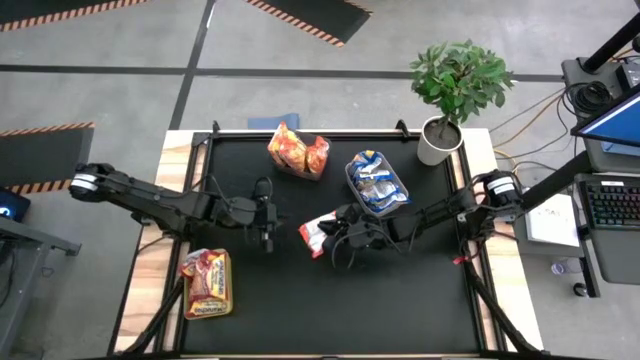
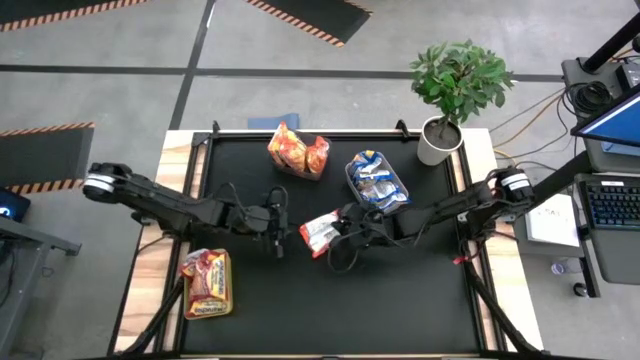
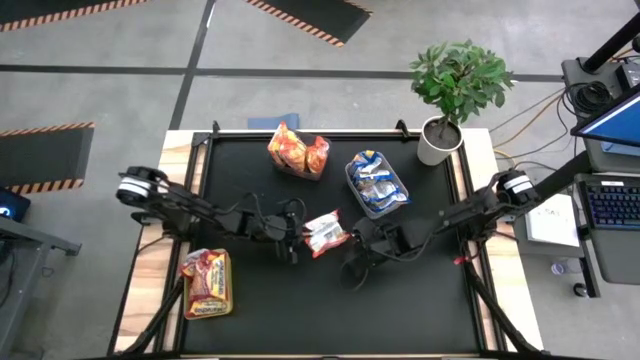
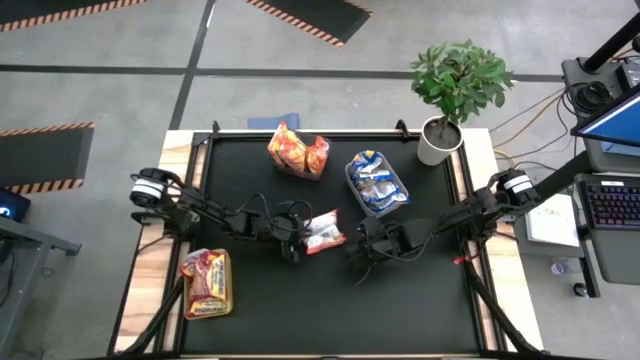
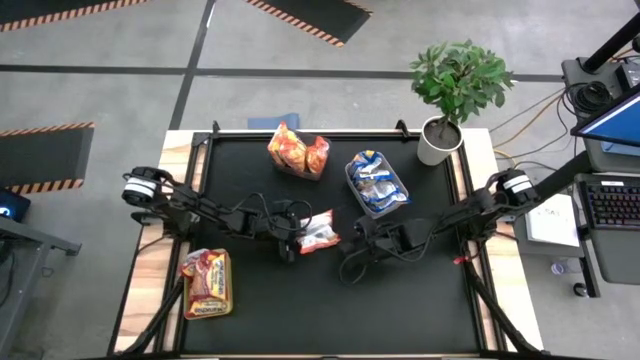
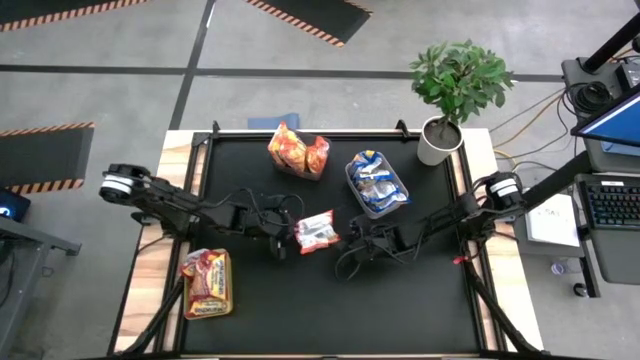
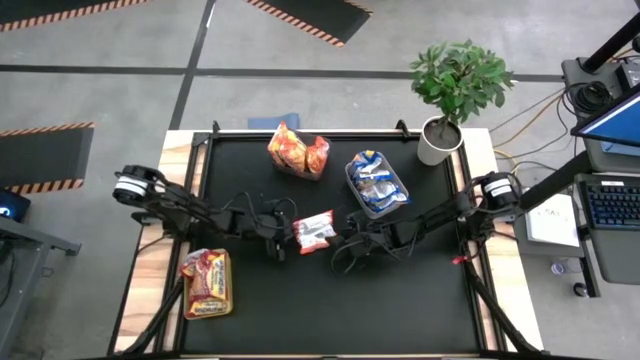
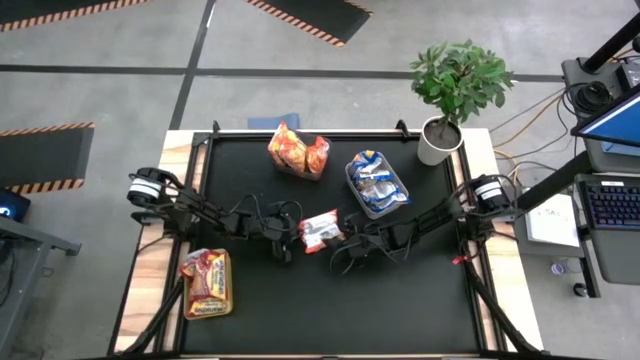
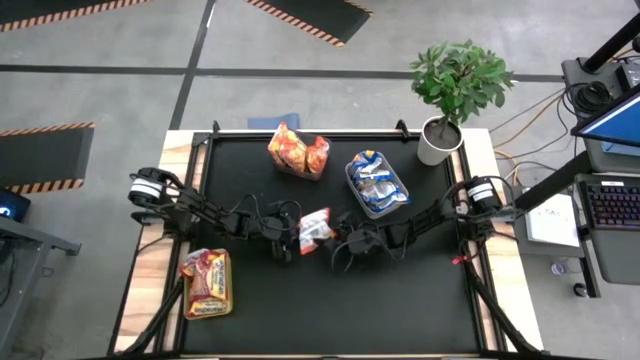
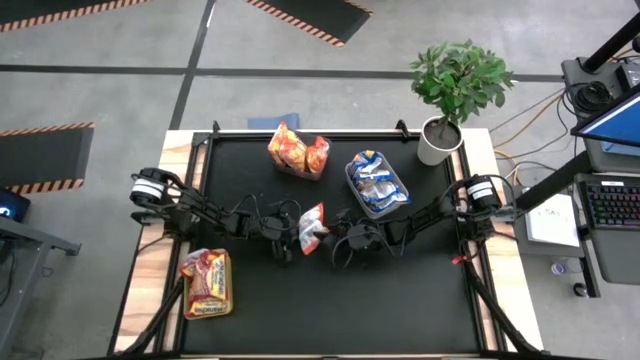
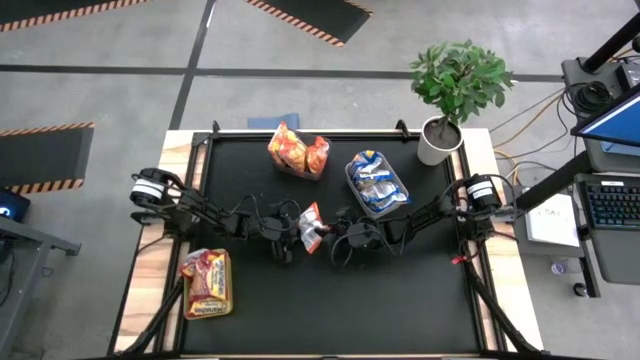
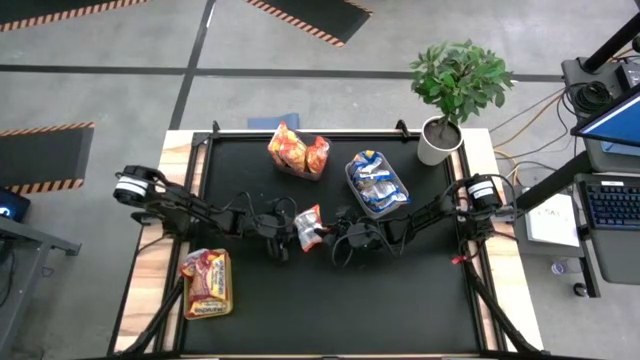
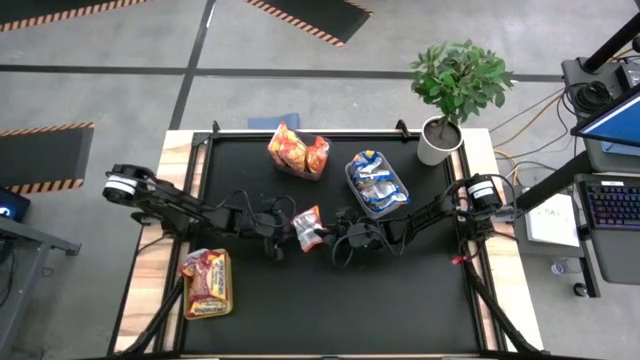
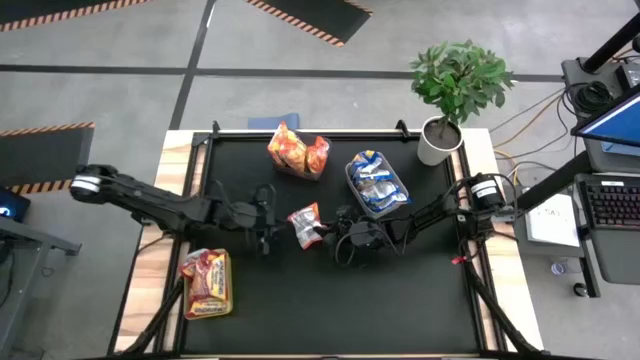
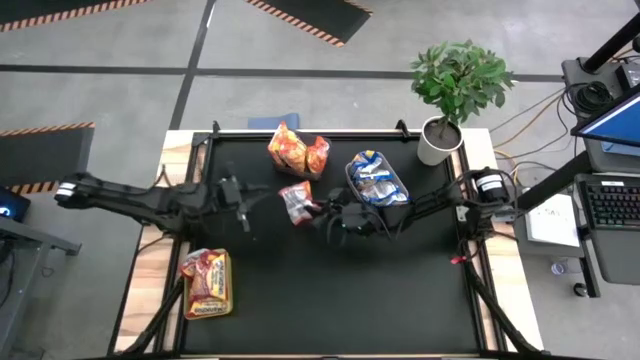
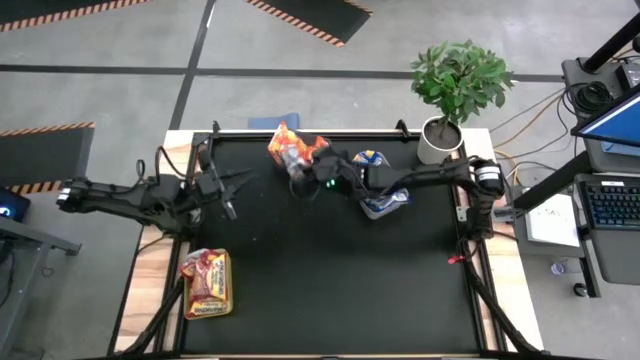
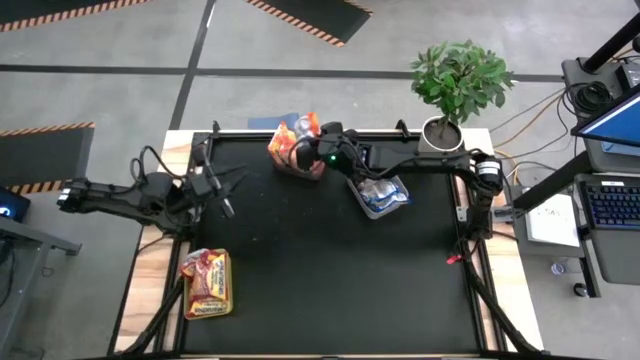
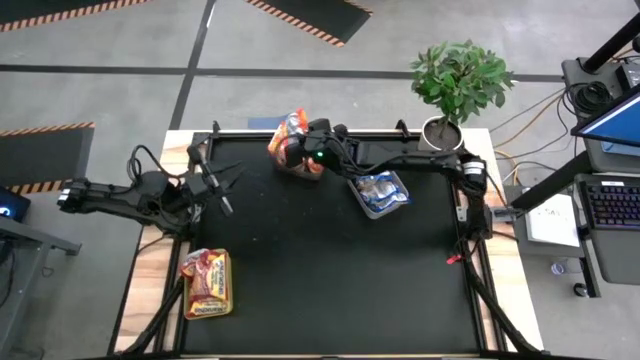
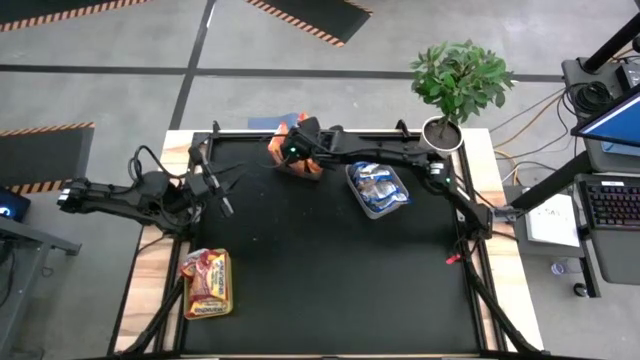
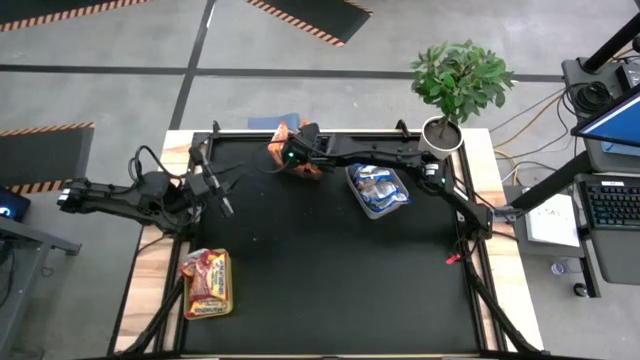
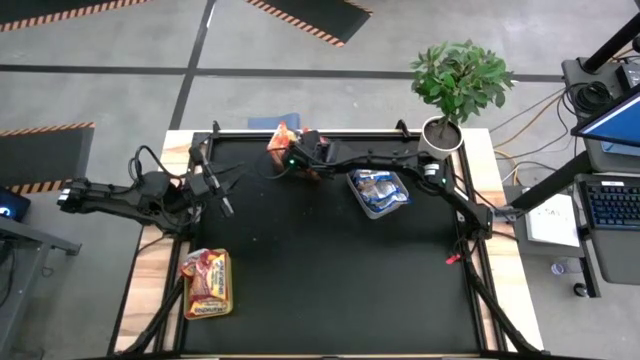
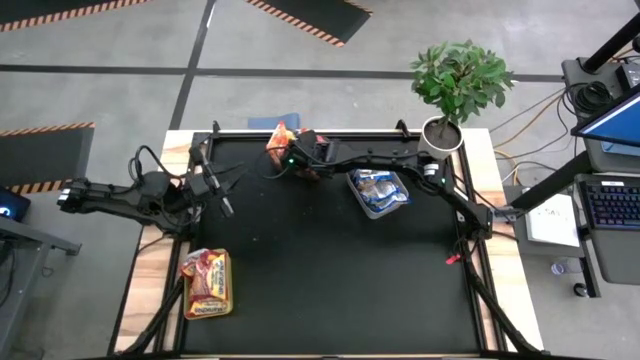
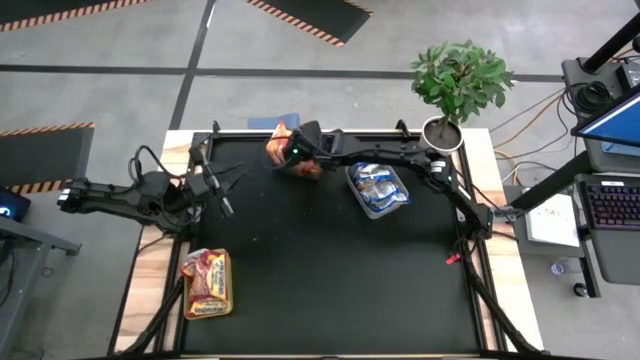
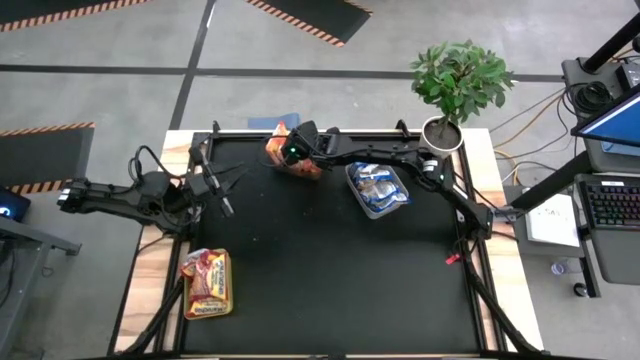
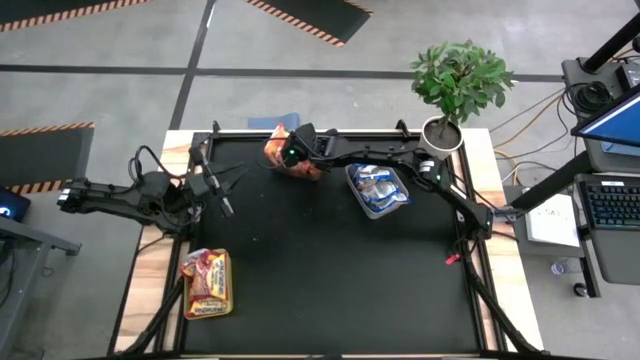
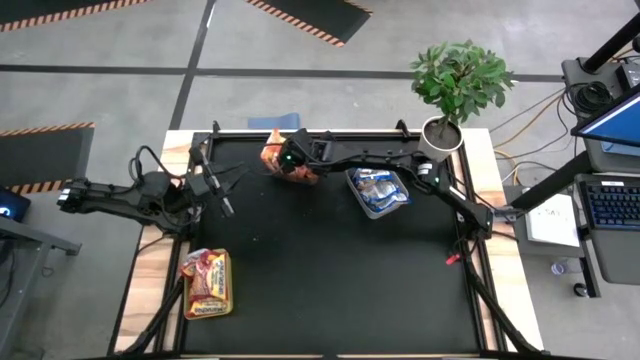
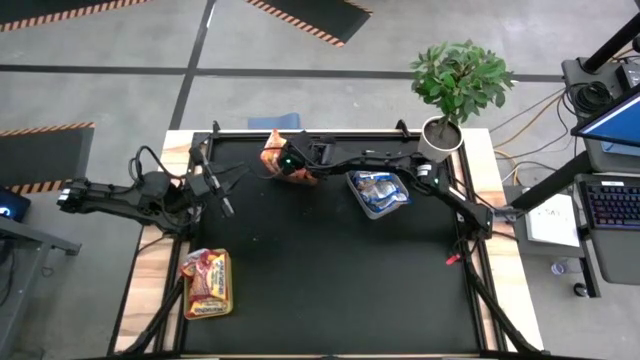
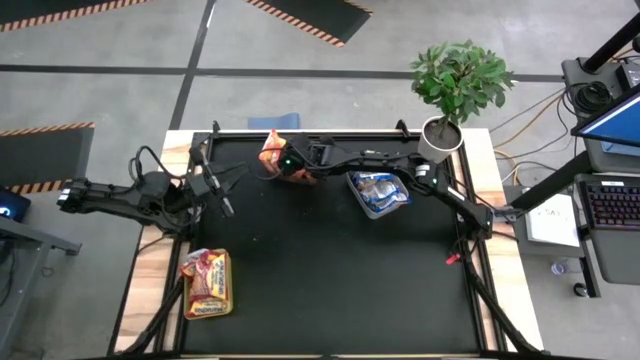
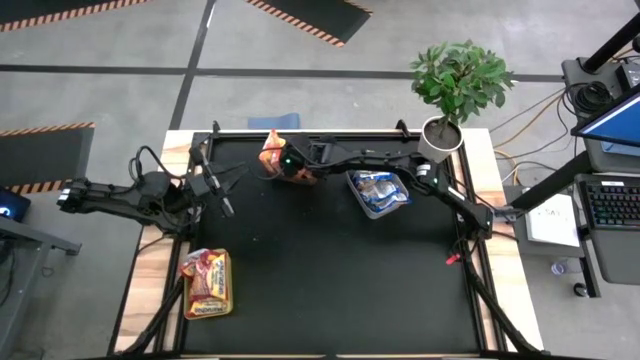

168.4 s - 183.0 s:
Task: Sort Maruchan noodles
Put the orange noodle pack into the black bin

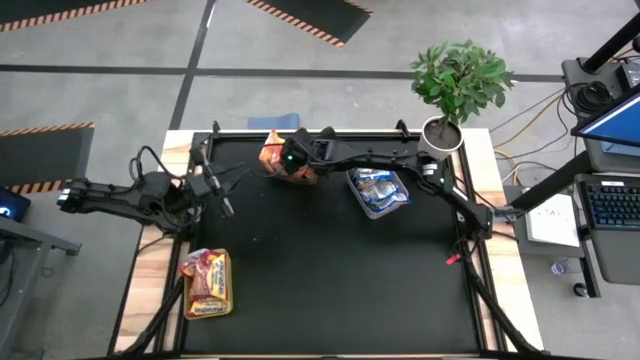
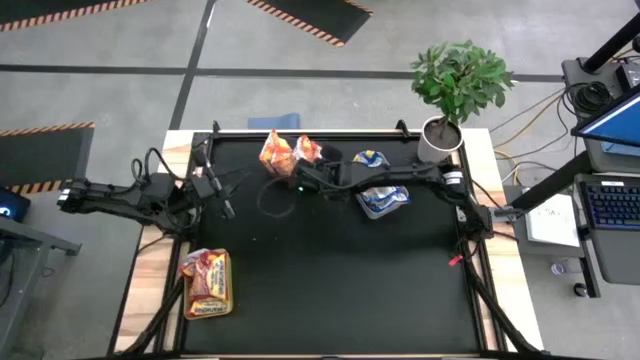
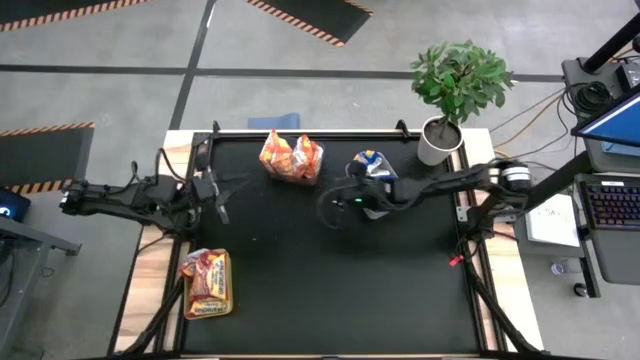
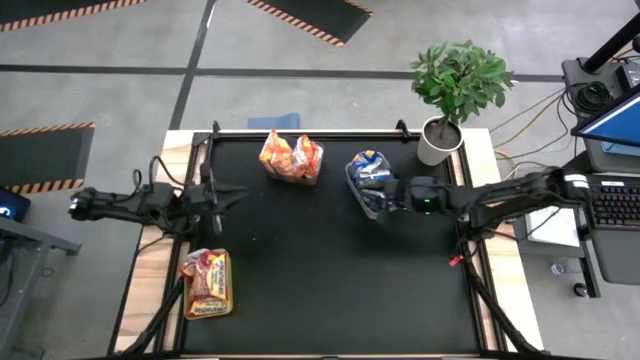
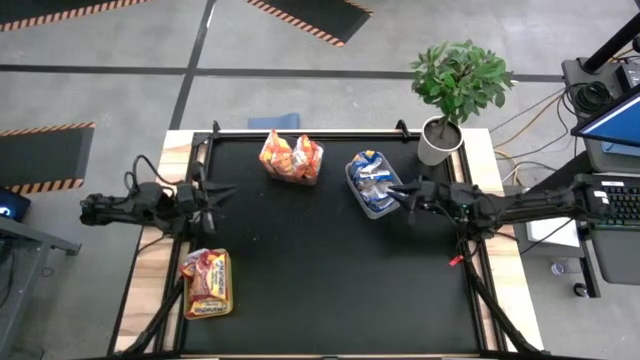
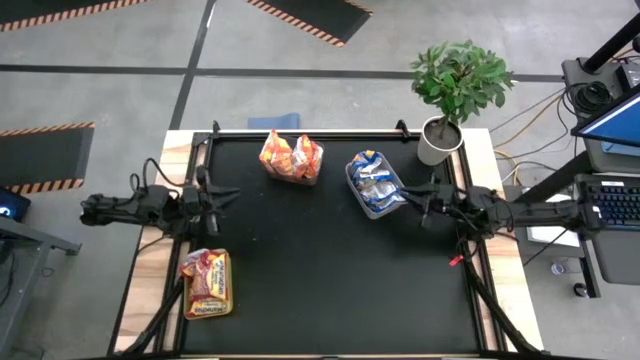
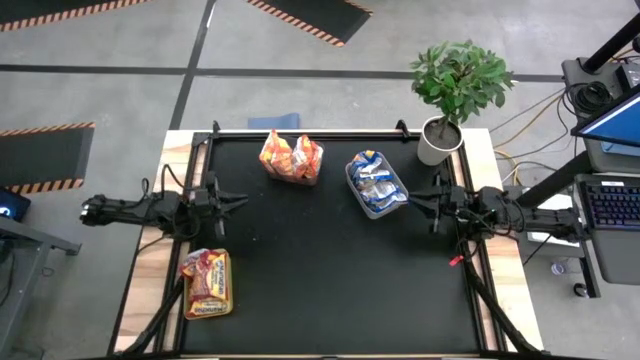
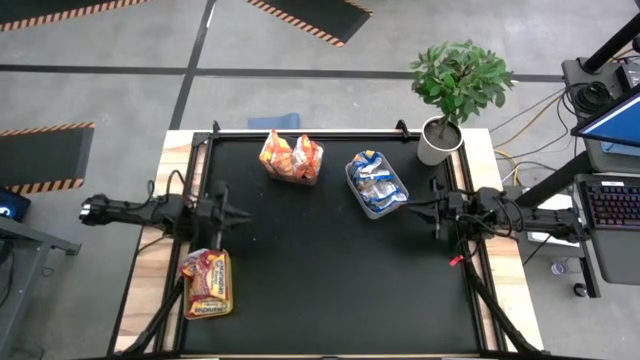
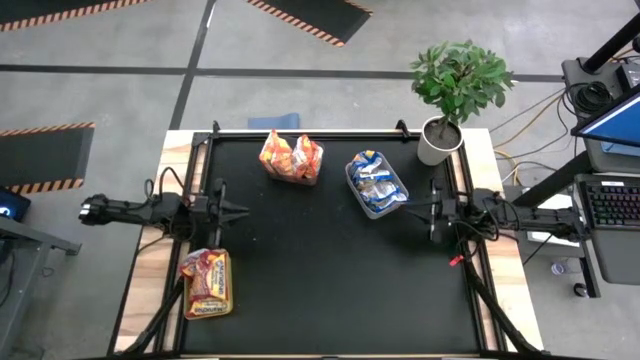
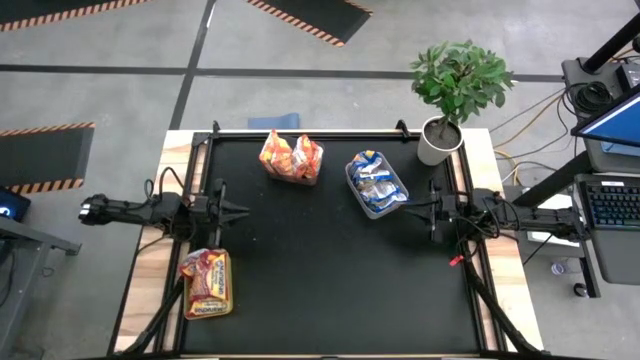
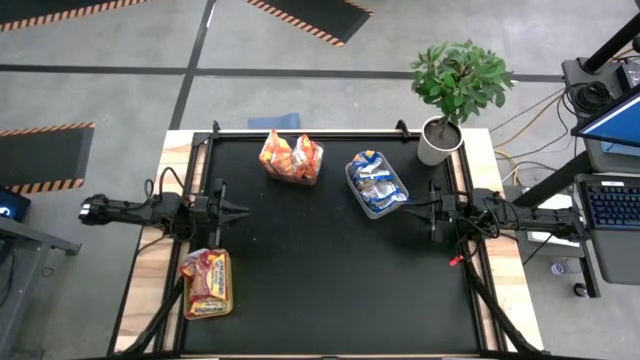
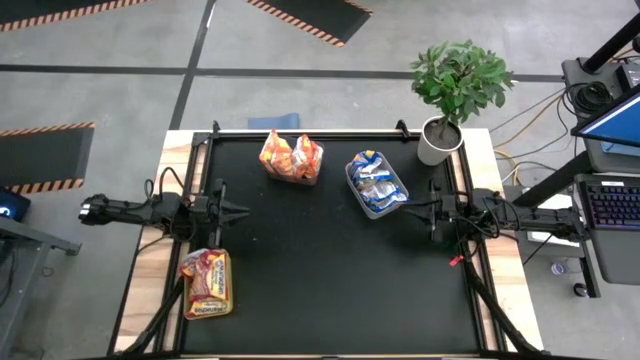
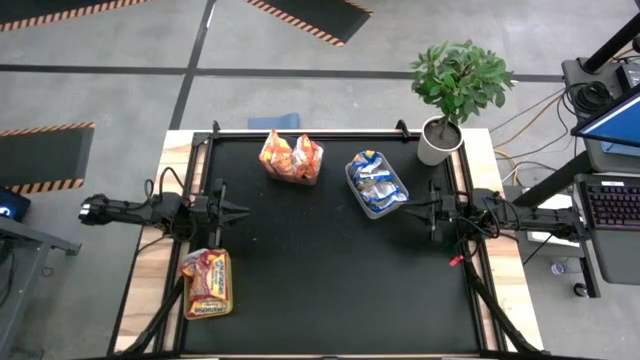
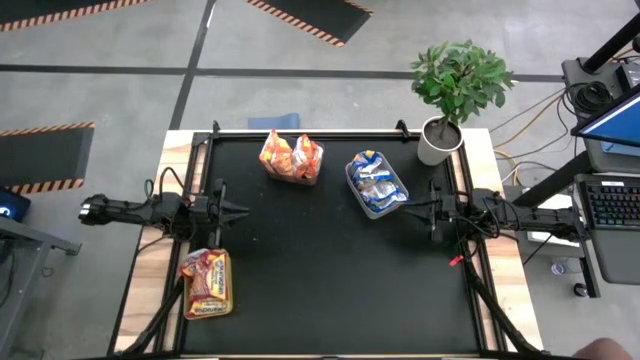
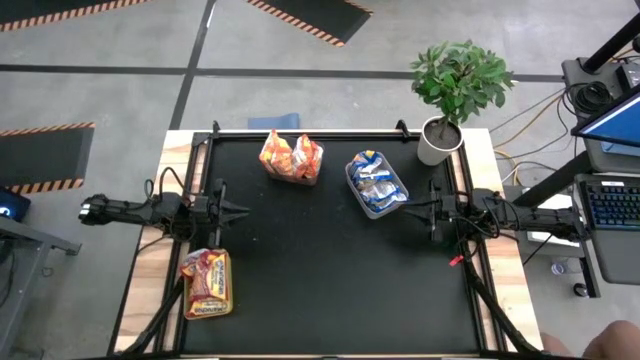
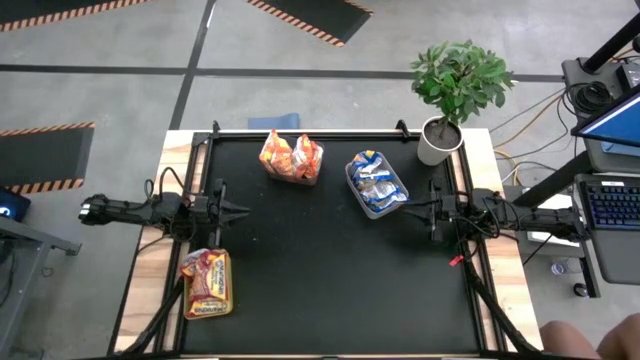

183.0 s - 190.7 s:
Return to Home Position
